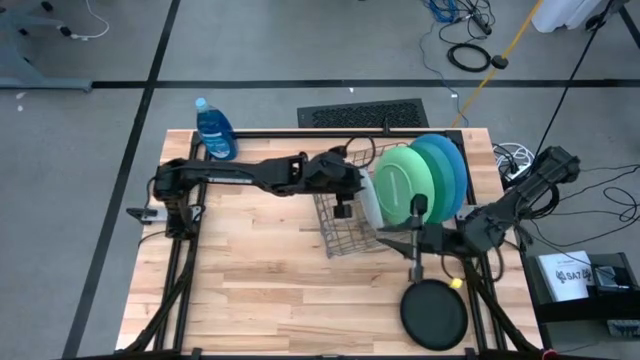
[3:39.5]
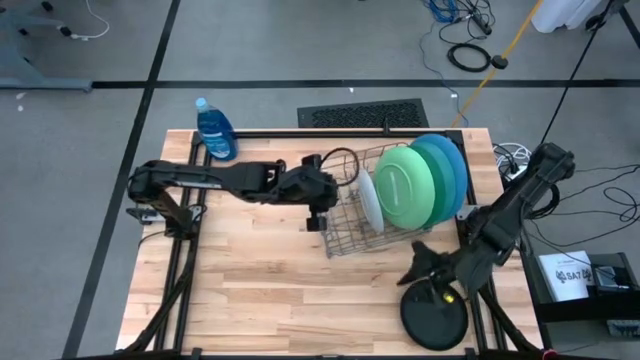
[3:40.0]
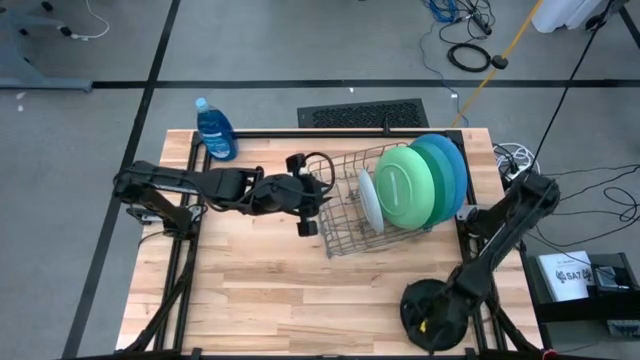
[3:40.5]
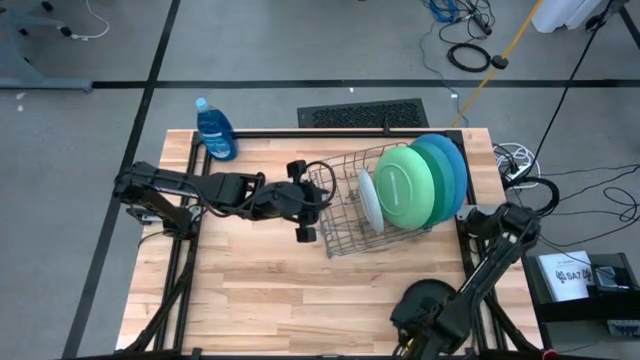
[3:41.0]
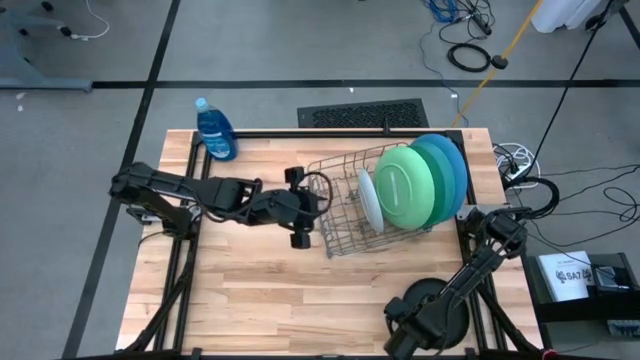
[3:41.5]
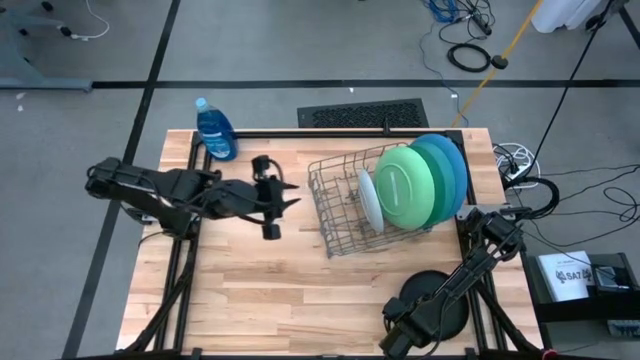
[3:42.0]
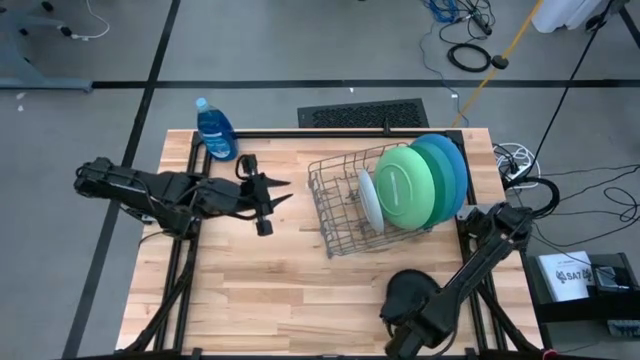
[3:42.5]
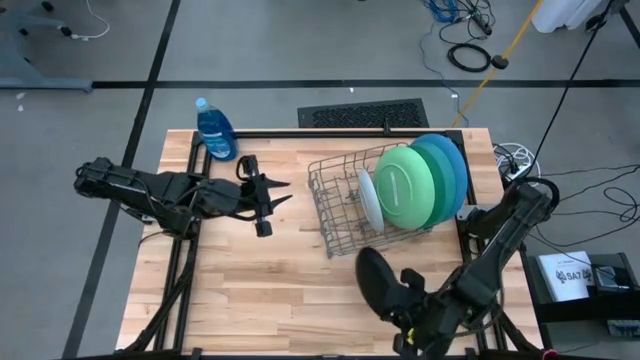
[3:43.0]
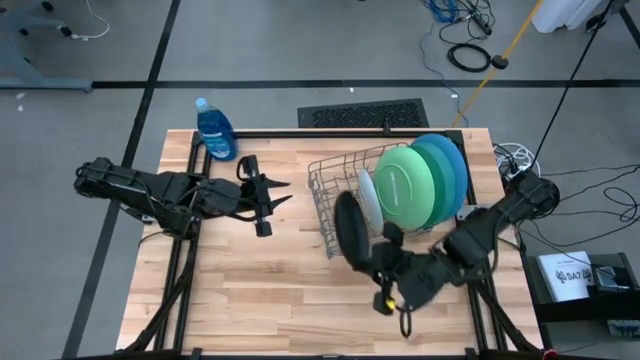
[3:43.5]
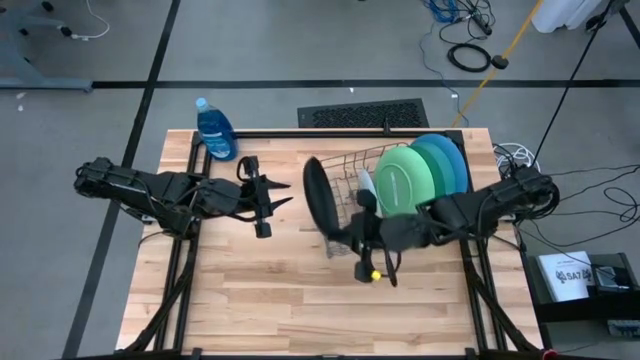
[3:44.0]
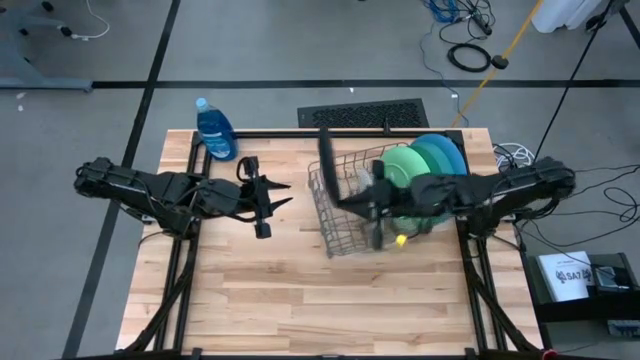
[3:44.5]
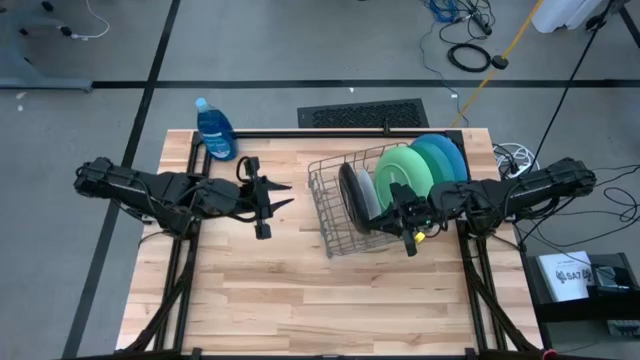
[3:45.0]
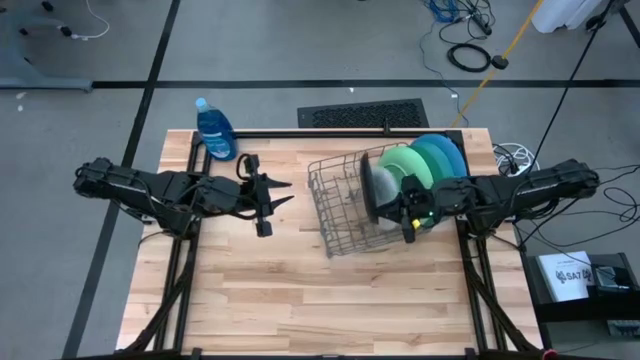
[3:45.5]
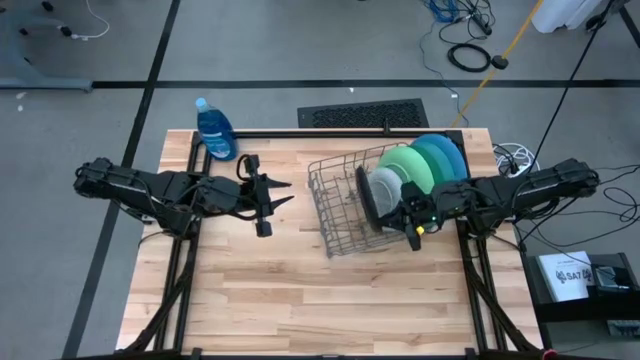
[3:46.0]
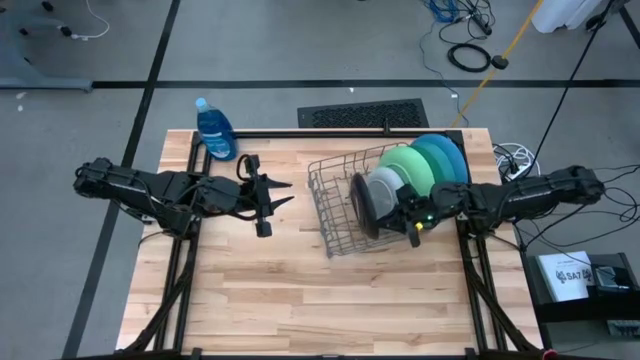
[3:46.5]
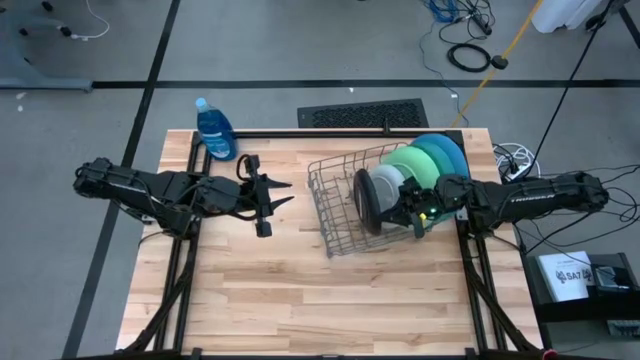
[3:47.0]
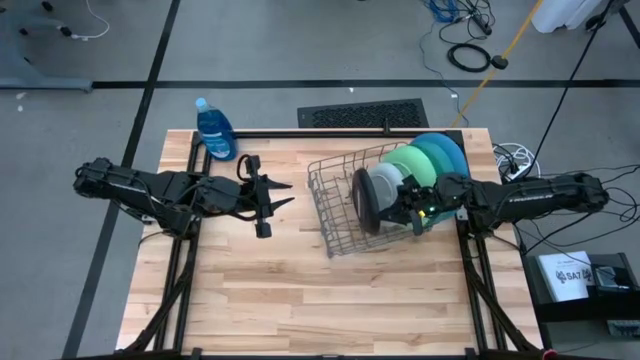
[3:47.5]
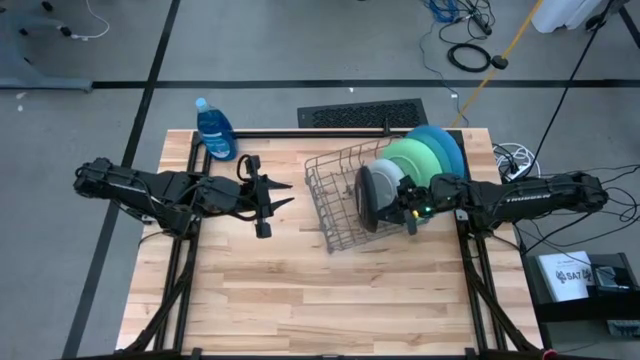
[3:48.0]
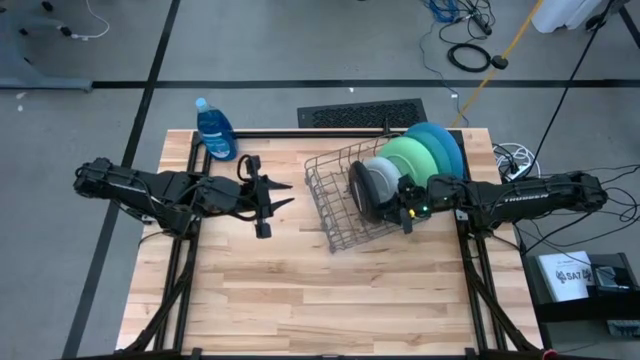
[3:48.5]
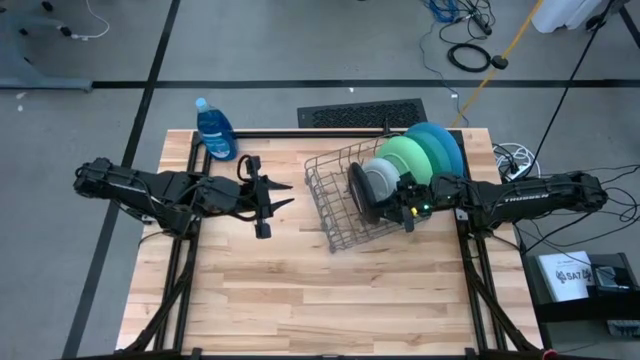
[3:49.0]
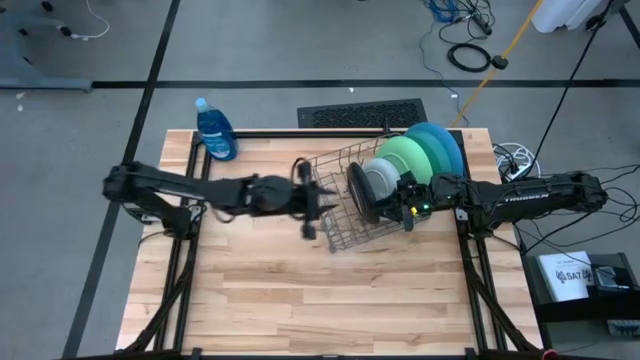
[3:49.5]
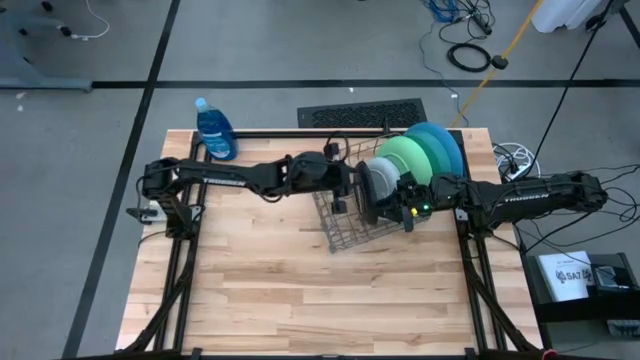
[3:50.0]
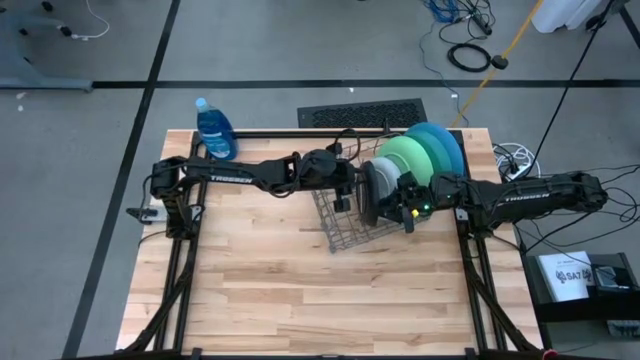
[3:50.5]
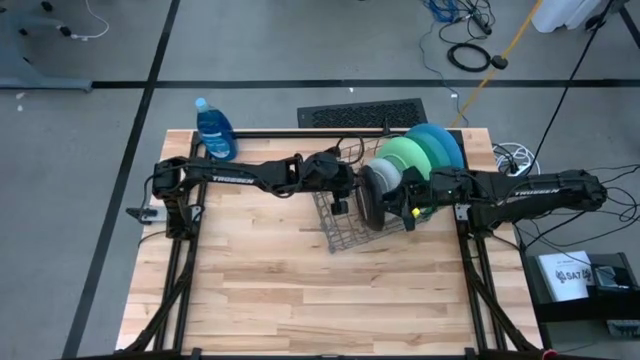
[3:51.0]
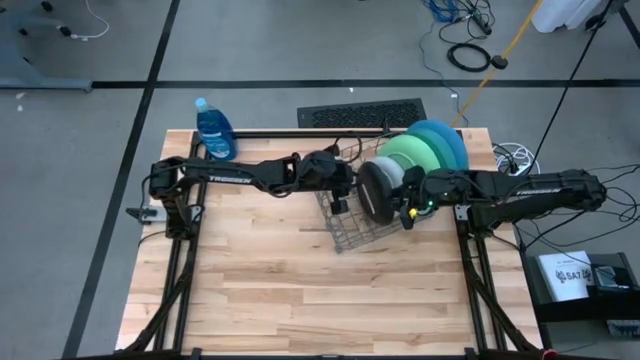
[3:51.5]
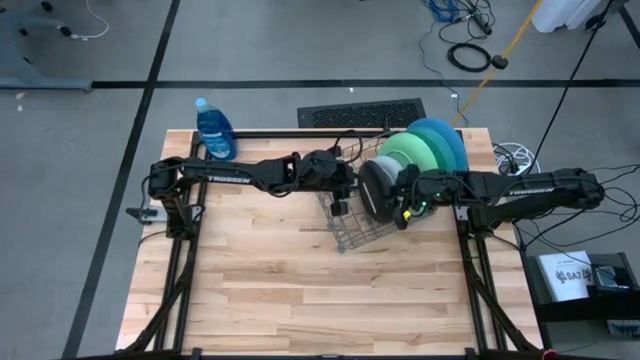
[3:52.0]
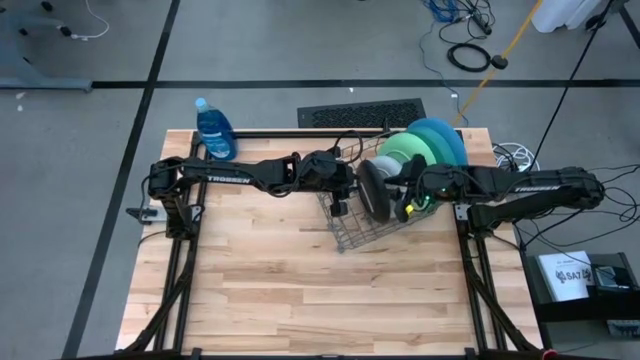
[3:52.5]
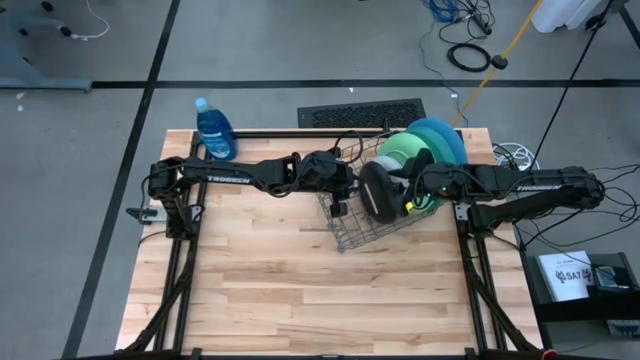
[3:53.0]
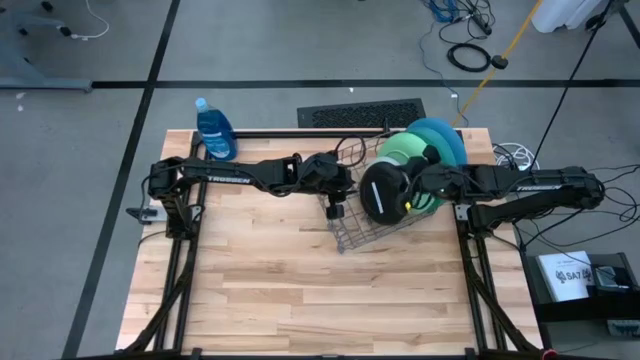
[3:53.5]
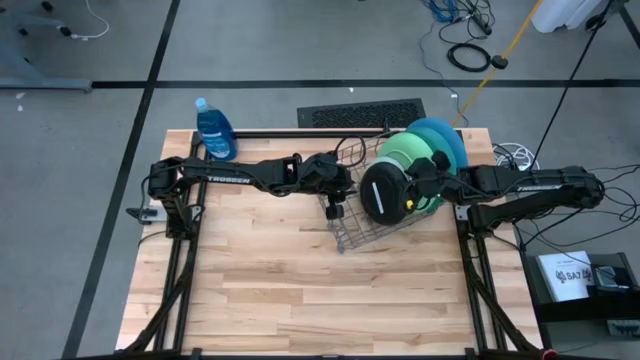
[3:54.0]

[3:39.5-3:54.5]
Task: Sort dishes
Put the black plate into the dish rack

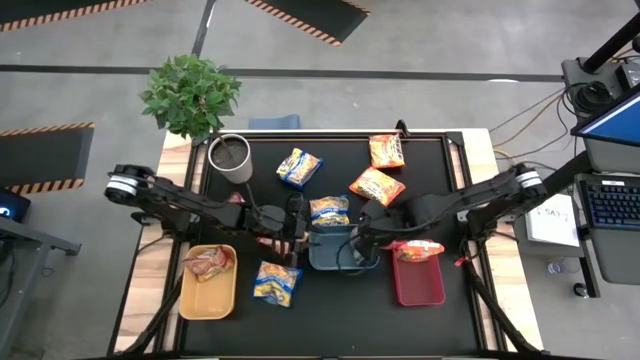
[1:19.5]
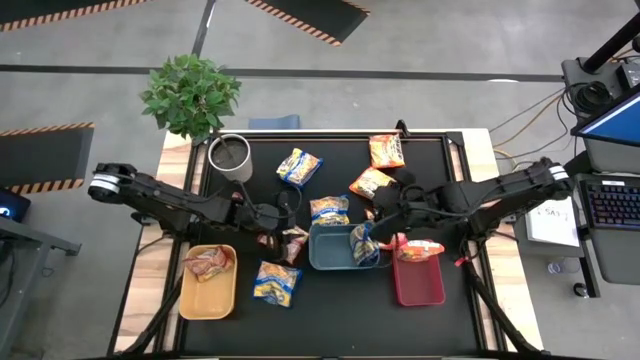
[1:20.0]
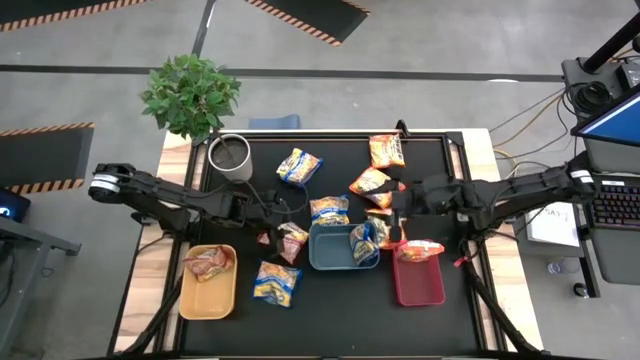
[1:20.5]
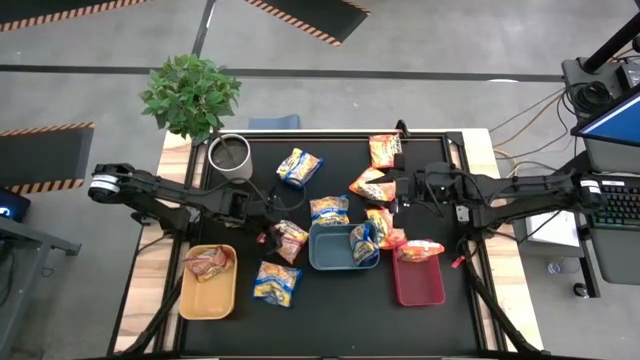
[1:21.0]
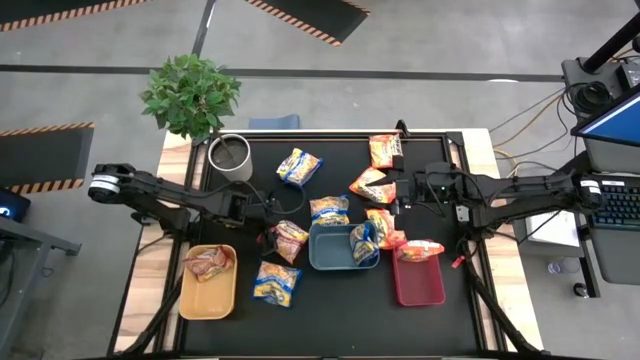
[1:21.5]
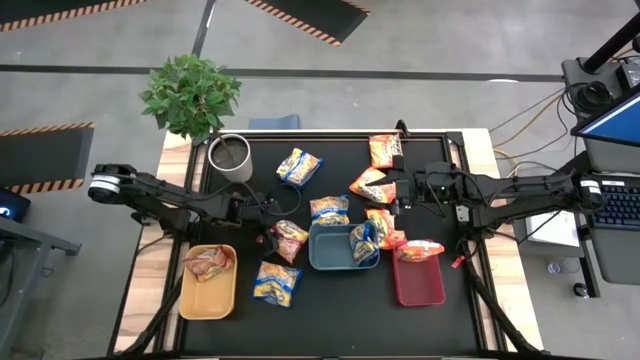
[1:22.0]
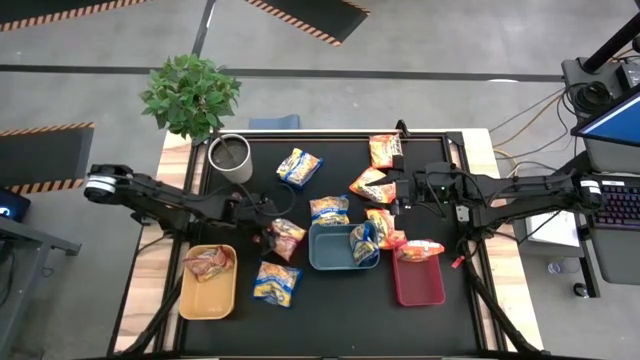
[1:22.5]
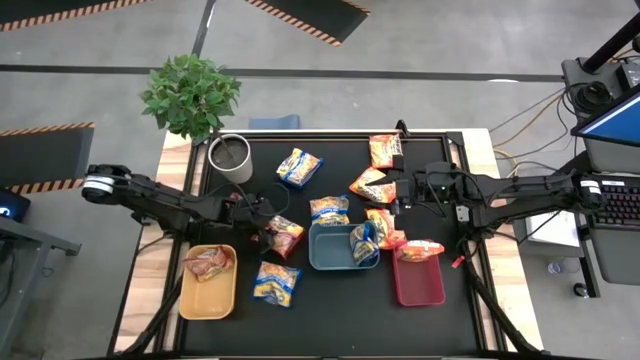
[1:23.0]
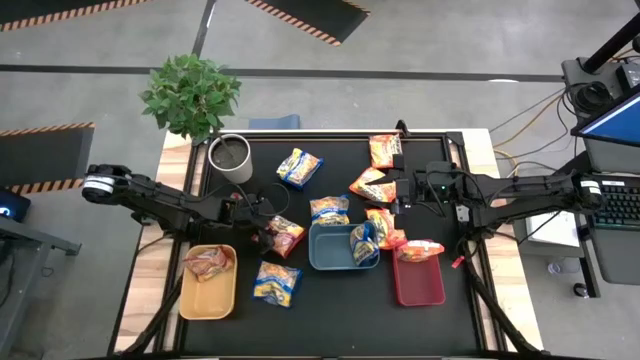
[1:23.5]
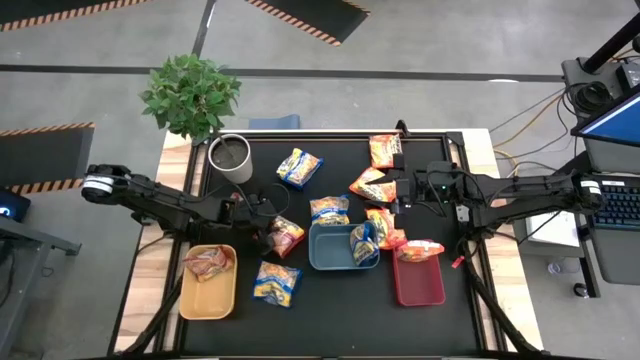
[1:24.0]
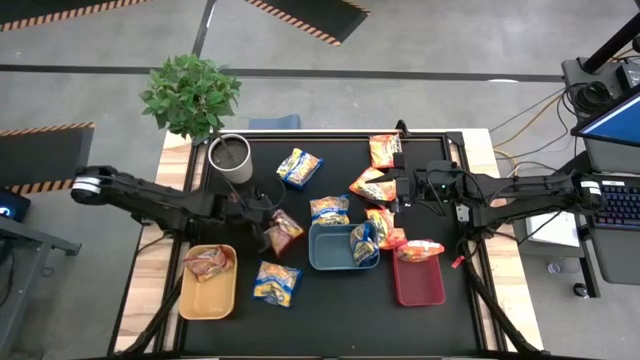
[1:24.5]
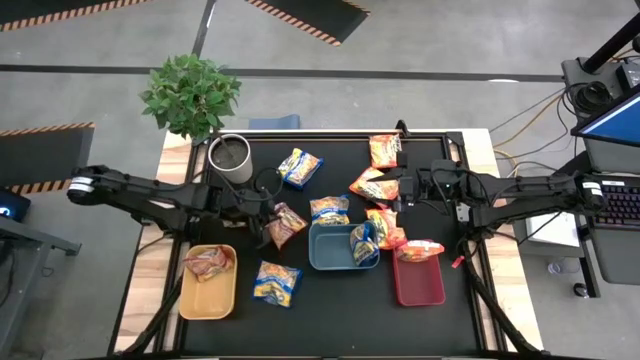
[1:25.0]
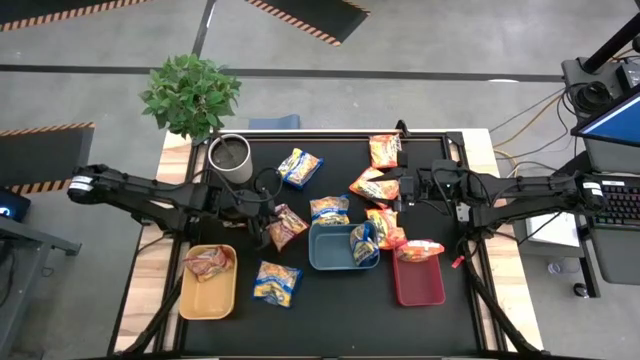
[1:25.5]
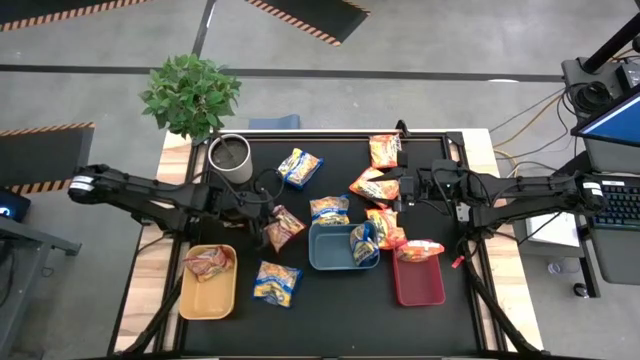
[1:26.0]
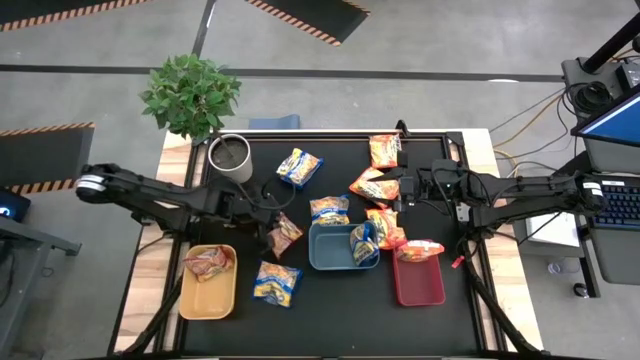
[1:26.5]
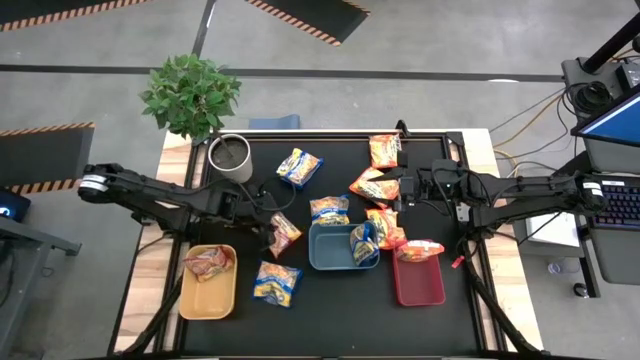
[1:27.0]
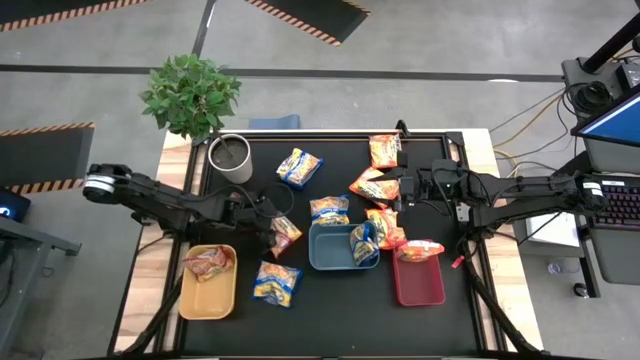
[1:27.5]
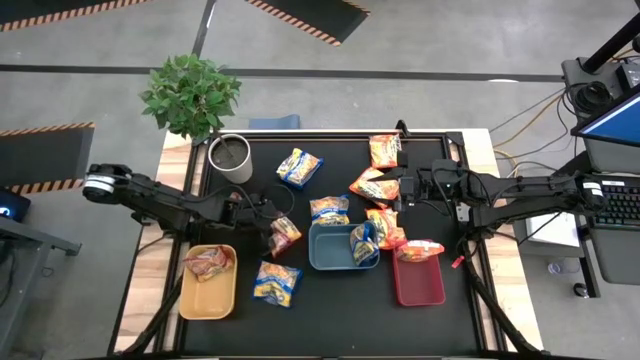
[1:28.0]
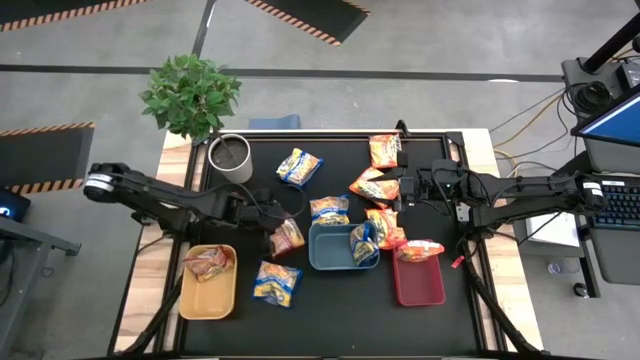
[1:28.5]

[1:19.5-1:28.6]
Task: Sort Maruchan noodles
Put the right red noodle pack into the yellow bin
